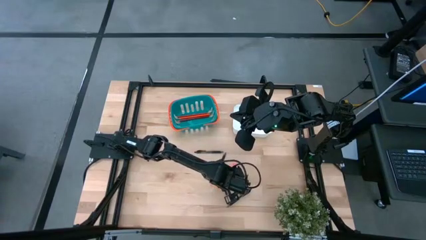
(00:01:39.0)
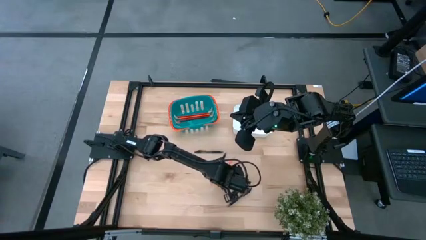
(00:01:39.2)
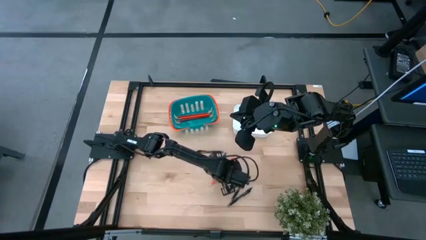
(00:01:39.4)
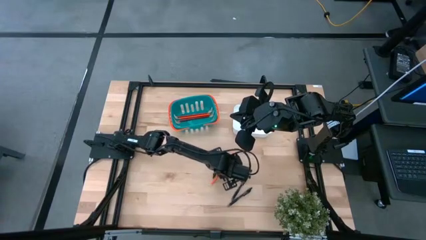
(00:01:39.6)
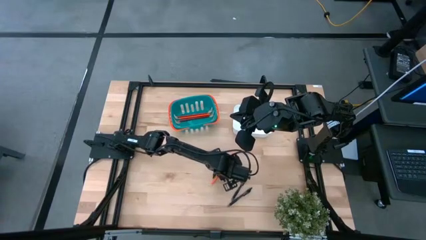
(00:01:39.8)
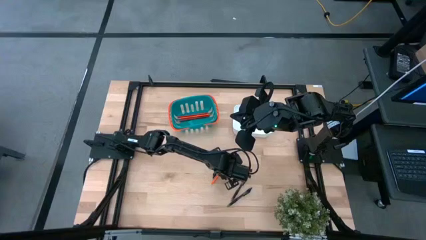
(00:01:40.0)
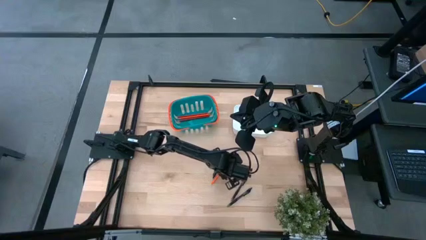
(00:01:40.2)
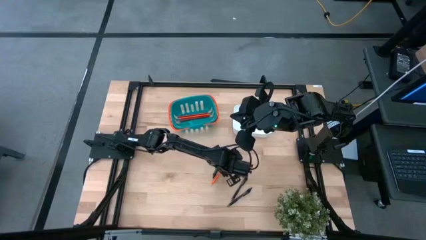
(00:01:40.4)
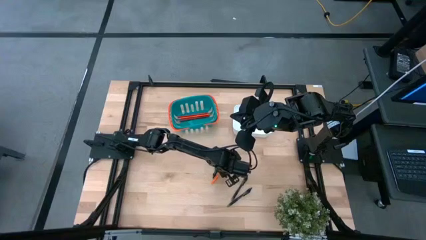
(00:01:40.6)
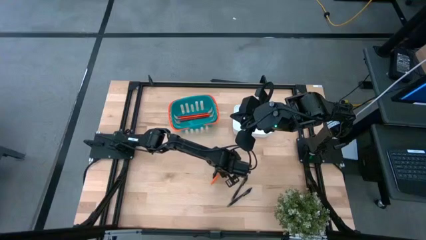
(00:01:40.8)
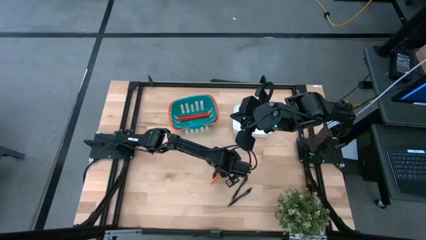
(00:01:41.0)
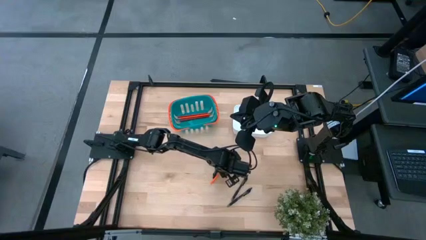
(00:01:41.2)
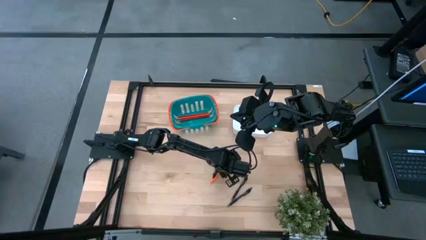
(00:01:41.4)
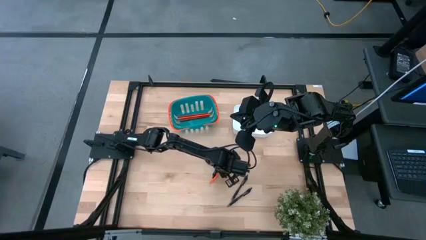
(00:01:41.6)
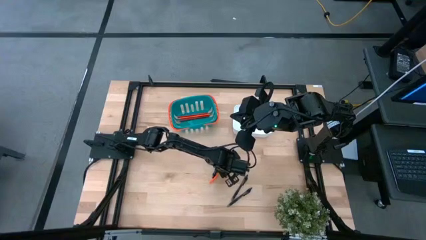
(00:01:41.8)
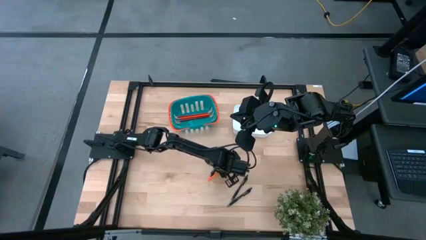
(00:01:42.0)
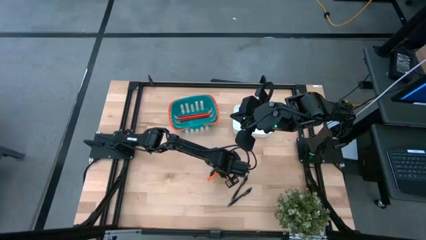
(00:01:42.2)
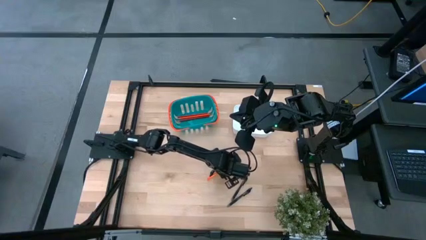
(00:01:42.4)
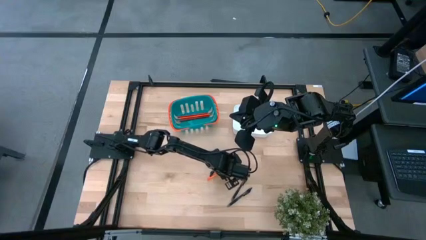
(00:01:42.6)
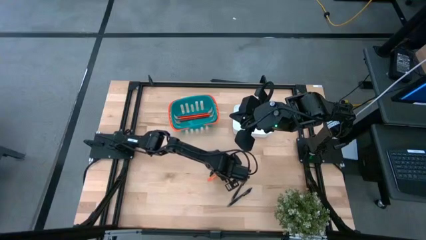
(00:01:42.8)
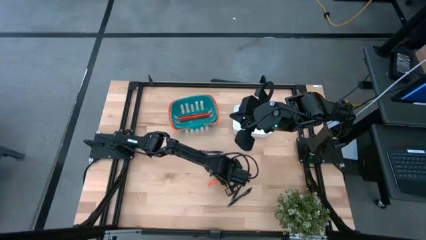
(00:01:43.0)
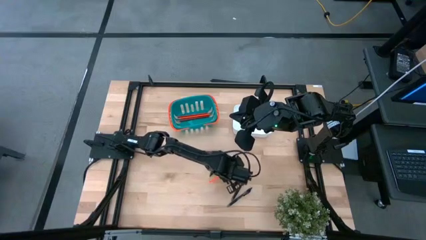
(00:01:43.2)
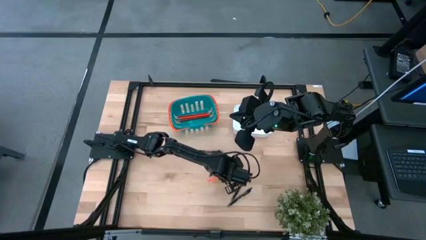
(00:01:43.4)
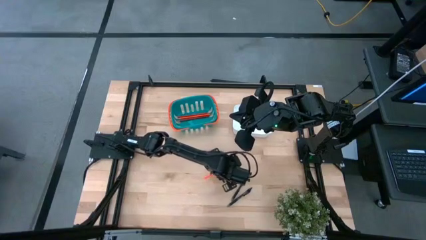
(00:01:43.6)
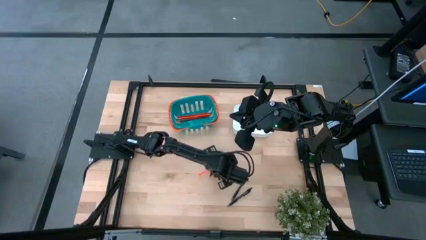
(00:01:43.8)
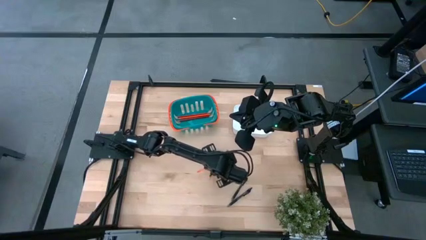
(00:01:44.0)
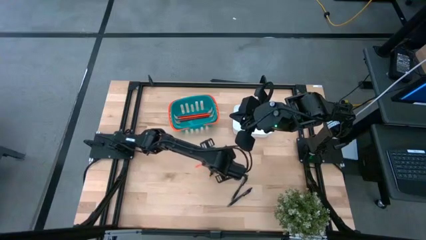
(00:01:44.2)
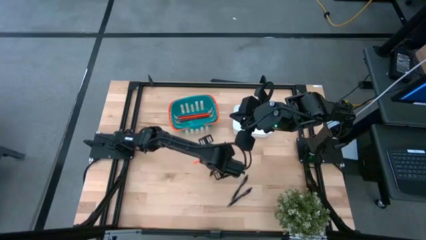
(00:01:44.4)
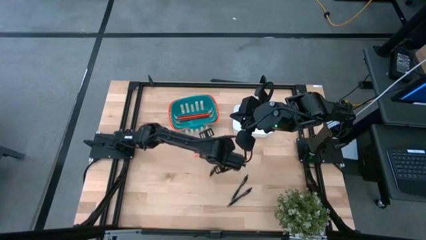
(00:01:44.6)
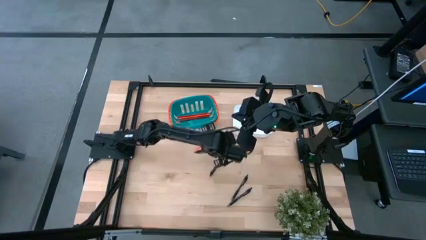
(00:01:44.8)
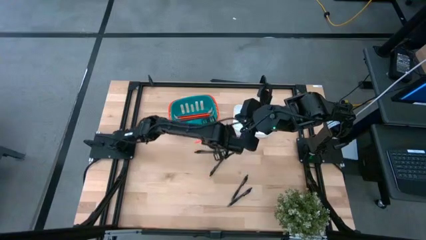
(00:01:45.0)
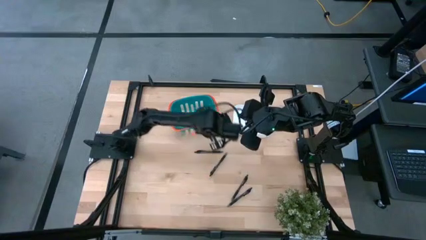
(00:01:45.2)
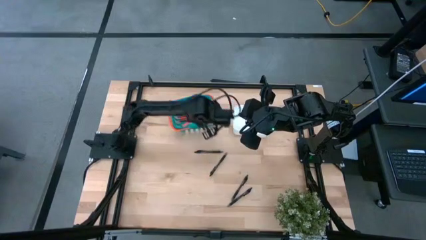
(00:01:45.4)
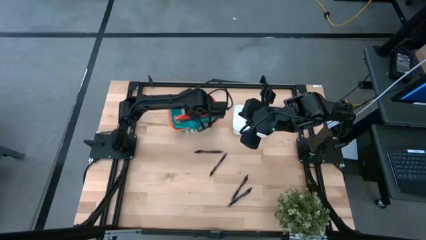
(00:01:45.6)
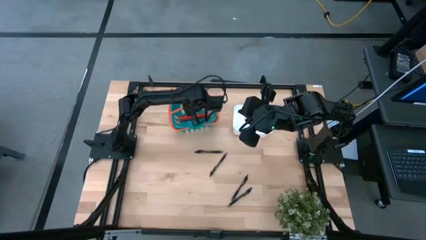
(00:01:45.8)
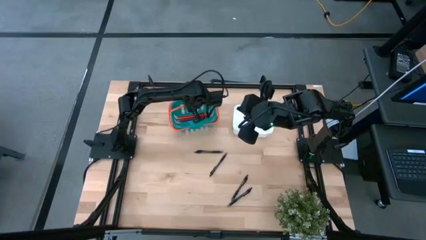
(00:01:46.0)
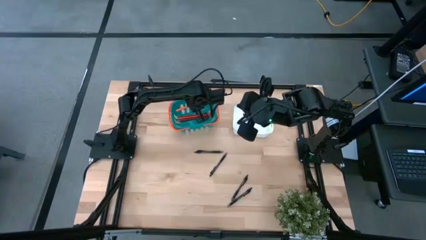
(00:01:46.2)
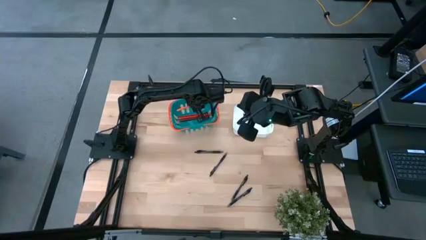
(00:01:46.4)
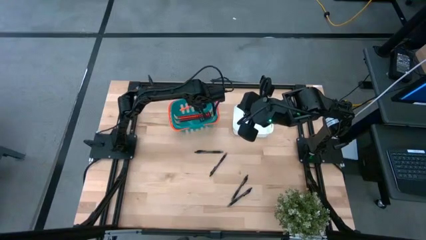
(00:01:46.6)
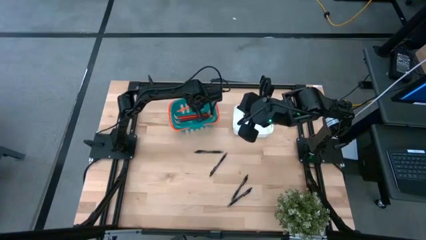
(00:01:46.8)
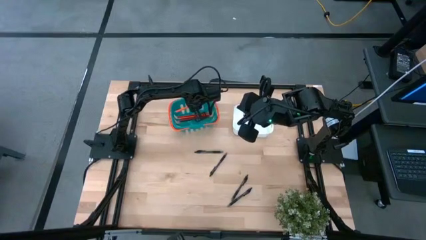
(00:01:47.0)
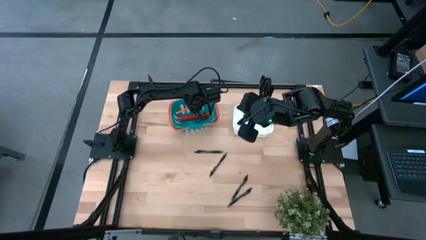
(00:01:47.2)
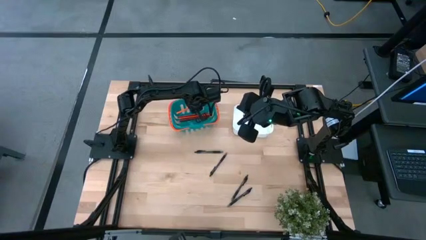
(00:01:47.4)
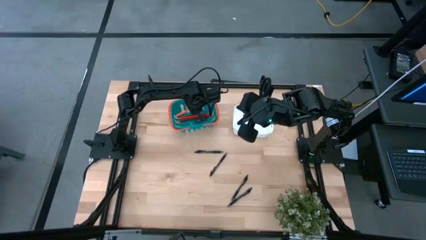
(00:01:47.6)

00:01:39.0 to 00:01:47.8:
Task: Sort pens & pencils
Put the orange pencil into the blue bin

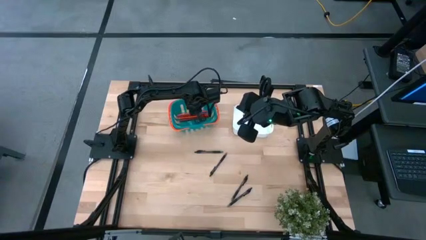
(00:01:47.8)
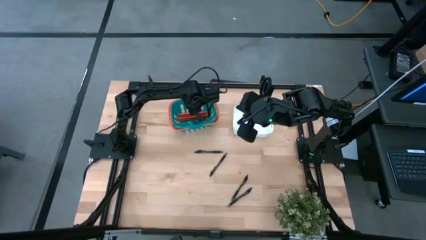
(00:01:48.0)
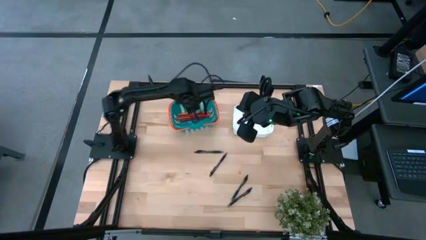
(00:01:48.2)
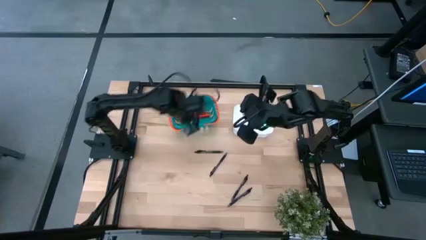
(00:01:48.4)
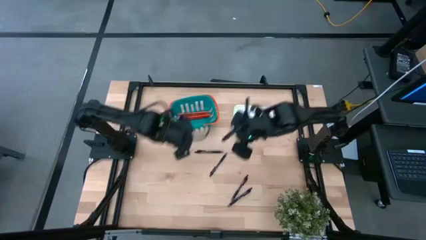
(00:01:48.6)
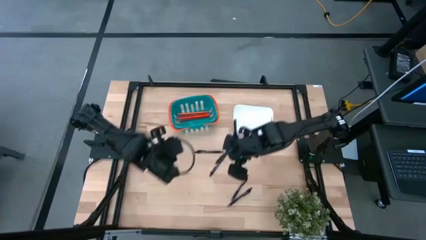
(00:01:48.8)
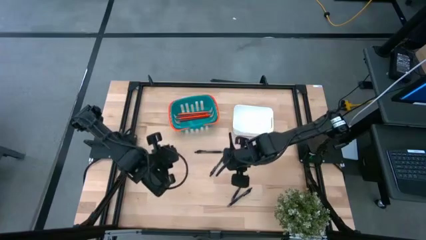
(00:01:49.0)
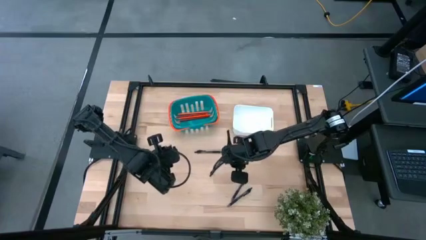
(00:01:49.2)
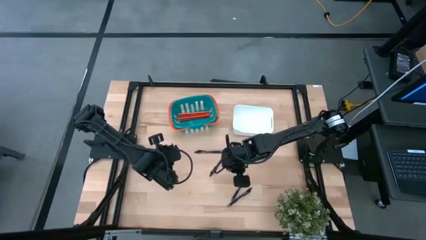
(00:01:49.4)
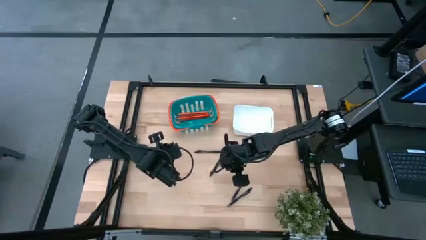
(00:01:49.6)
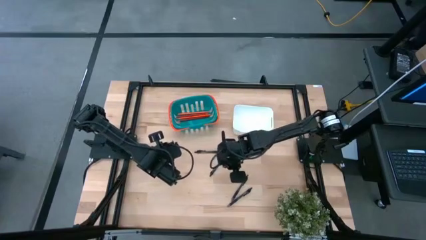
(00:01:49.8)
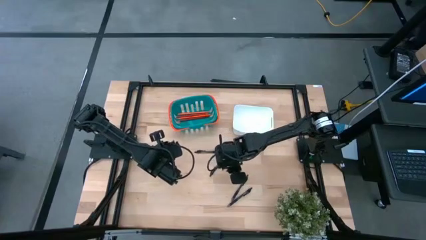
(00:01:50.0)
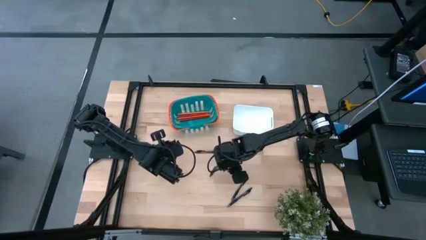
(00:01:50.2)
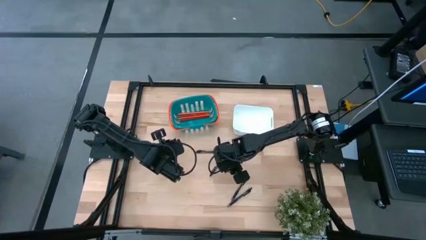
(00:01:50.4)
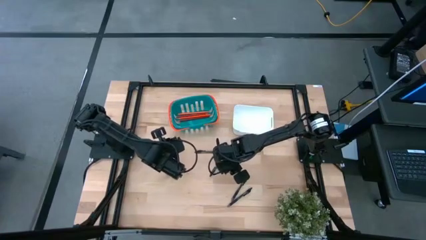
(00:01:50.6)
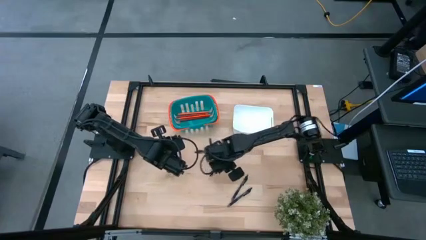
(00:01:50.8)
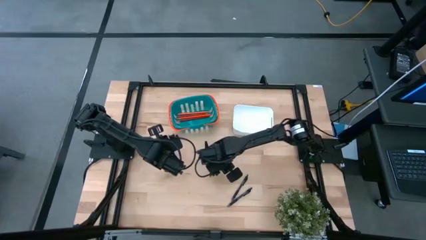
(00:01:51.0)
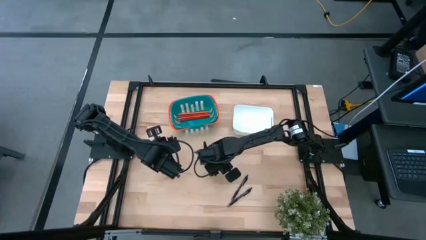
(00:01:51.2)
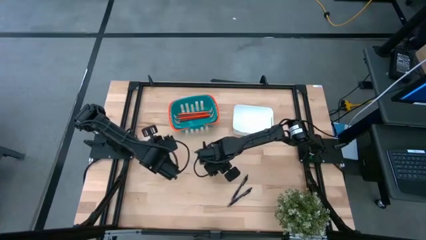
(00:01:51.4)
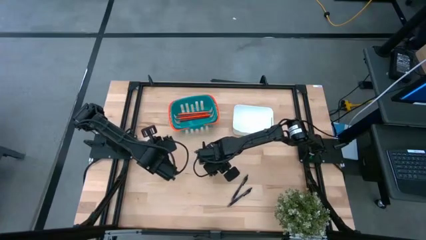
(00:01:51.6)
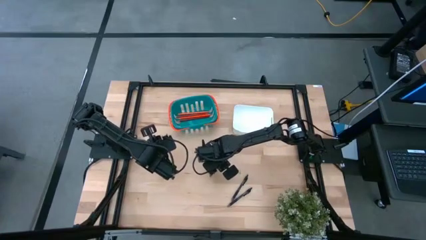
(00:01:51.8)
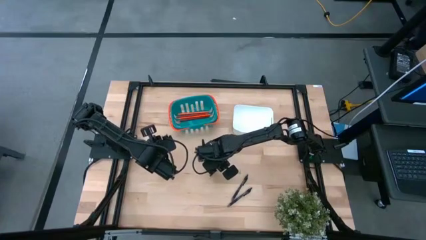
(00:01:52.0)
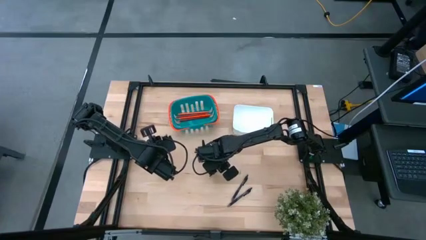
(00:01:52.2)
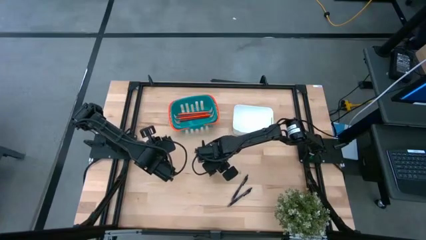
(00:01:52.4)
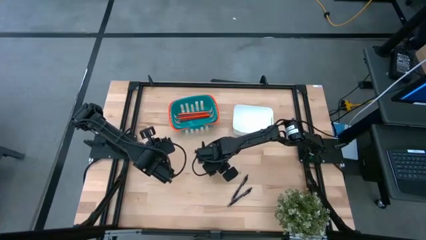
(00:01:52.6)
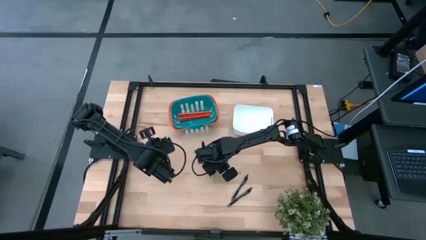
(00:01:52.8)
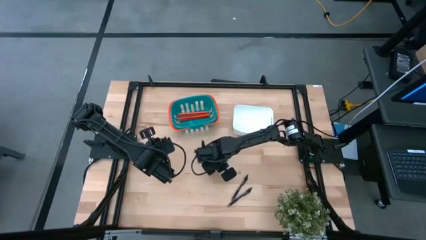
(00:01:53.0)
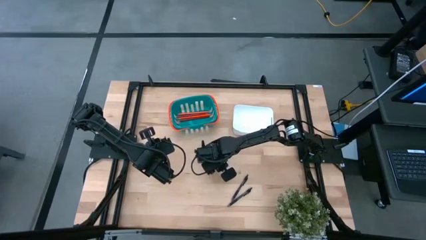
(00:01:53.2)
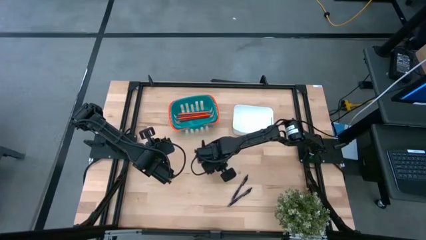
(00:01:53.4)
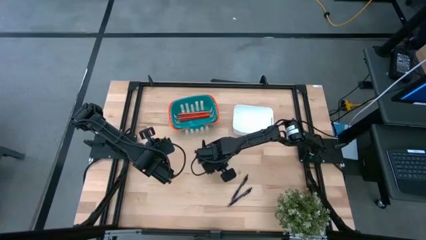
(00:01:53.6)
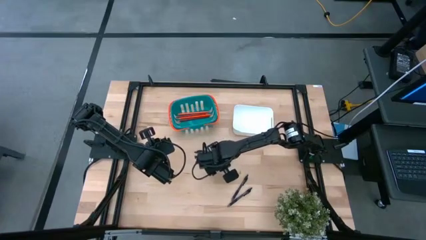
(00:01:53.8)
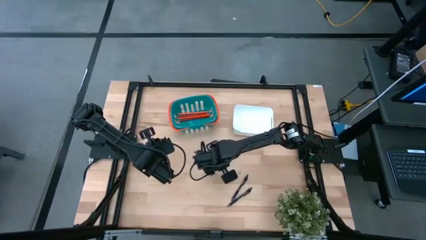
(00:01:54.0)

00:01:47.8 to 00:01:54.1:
Put the black pen into the white bin

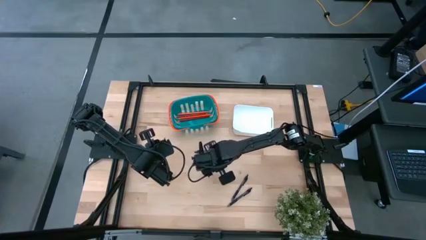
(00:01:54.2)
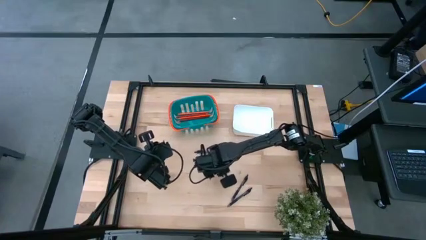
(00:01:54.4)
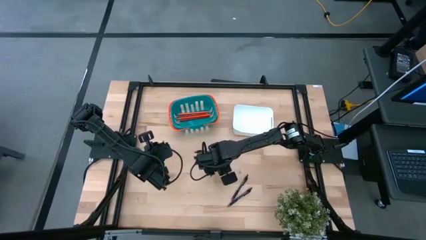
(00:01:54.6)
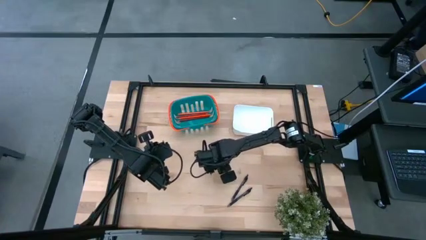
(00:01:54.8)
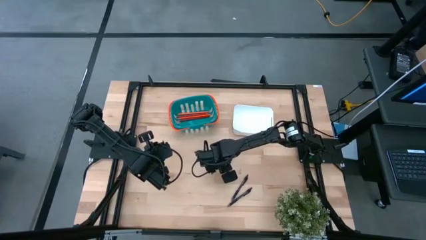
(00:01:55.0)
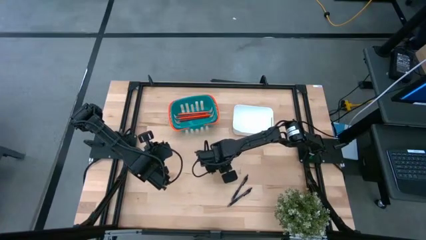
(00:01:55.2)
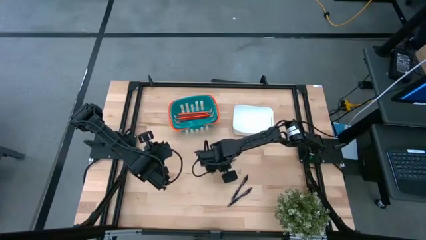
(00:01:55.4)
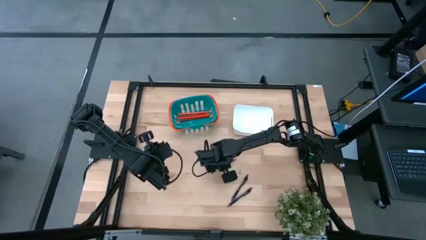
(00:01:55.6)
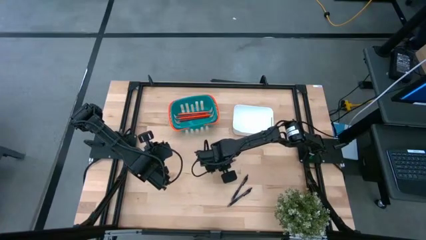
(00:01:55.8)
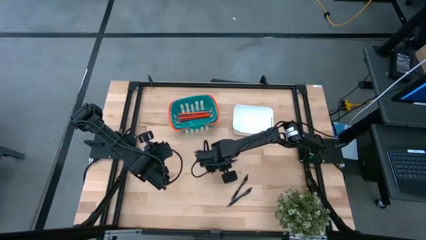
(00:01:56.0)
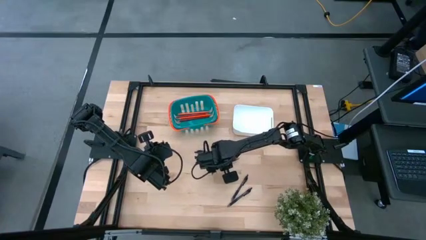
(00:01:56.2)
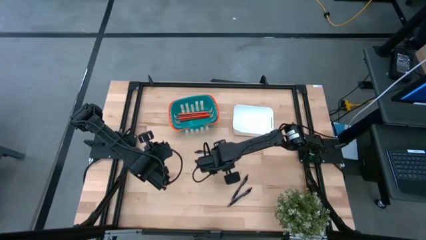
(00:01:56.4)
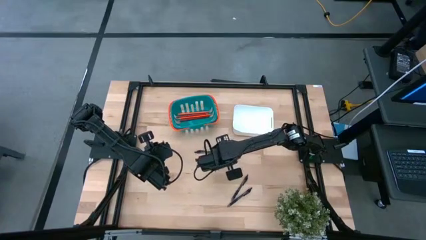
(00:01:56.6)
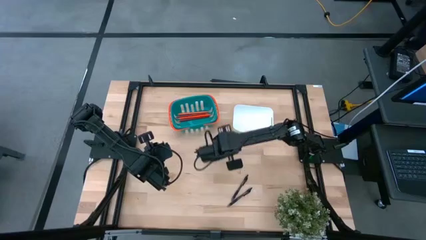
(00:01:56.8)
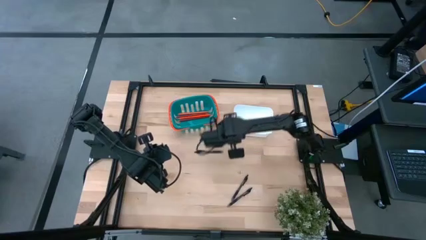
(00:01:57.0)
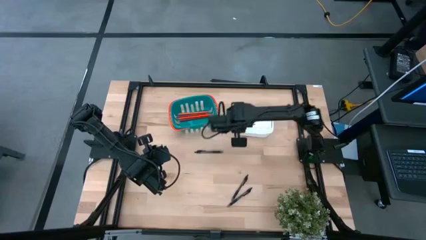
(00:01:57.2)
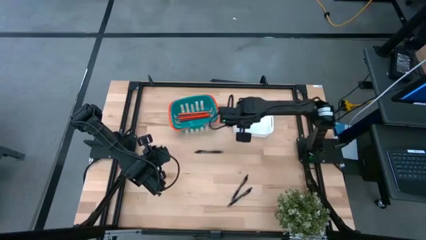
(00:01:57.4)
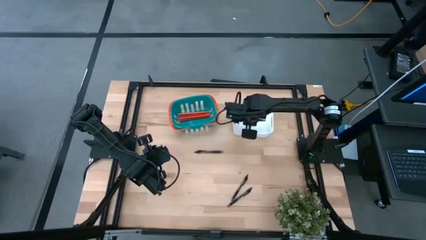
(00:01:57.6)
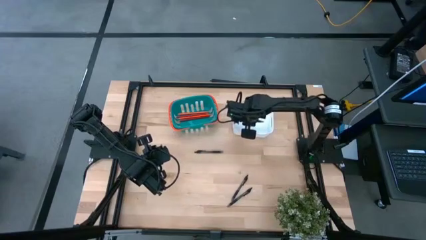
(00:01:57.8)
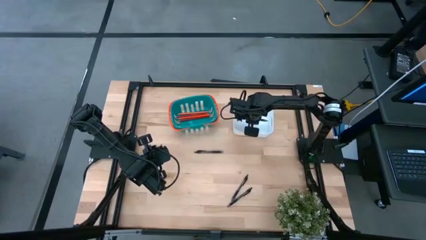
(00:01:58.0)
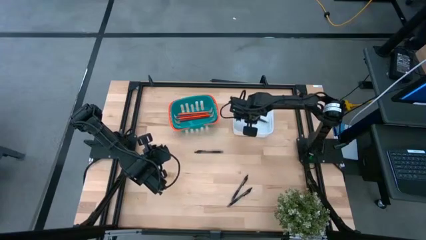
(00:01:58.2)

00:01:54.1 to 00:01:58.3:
Put the black pen into the white bin
